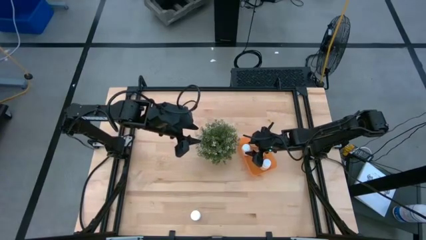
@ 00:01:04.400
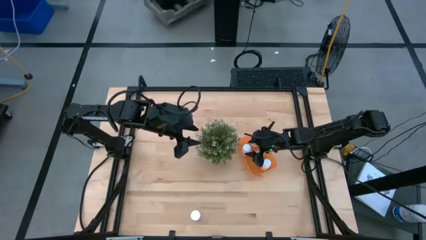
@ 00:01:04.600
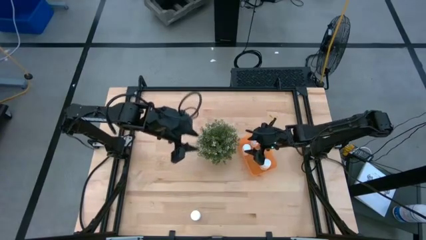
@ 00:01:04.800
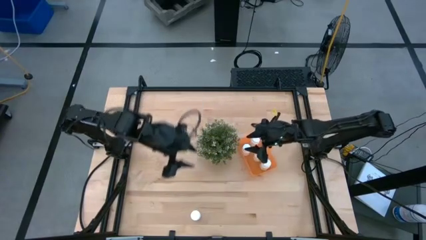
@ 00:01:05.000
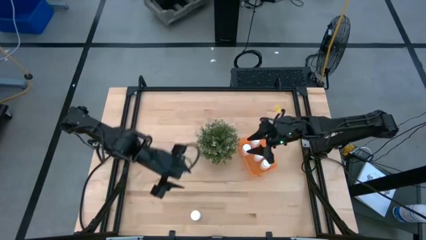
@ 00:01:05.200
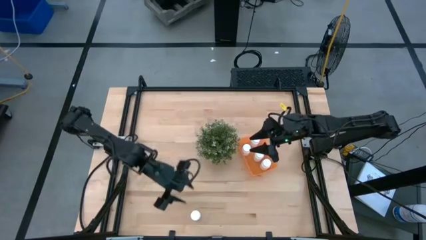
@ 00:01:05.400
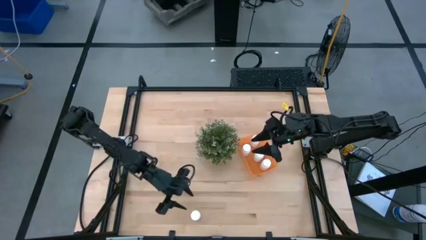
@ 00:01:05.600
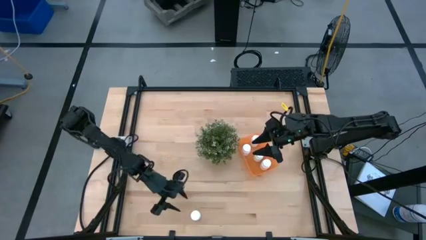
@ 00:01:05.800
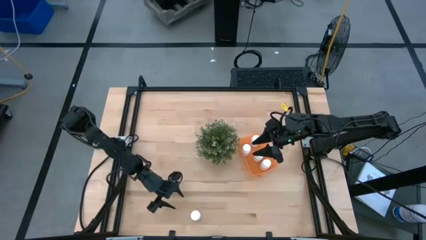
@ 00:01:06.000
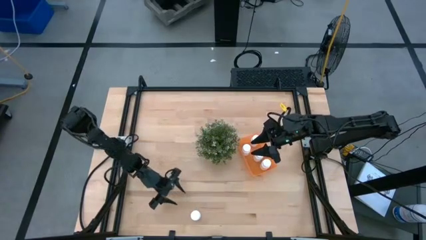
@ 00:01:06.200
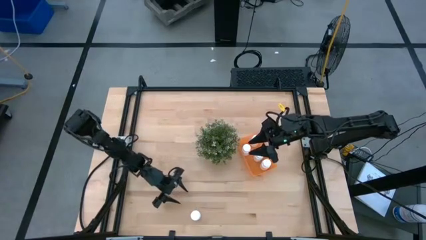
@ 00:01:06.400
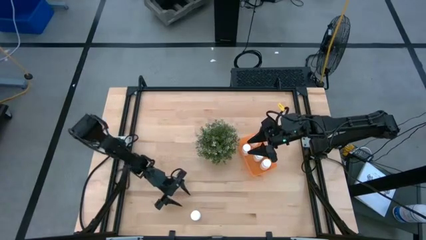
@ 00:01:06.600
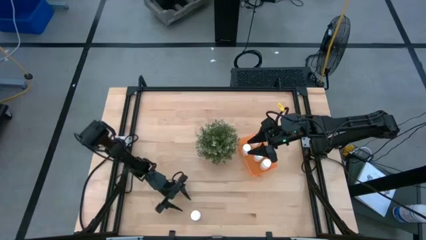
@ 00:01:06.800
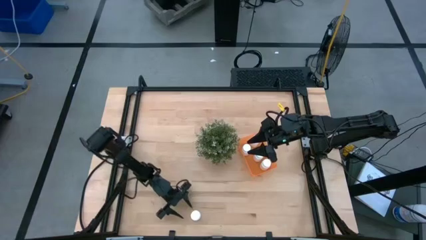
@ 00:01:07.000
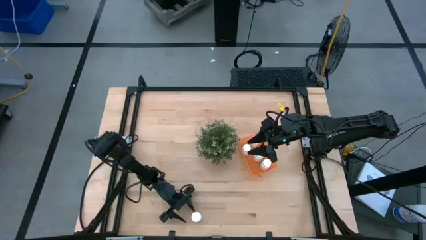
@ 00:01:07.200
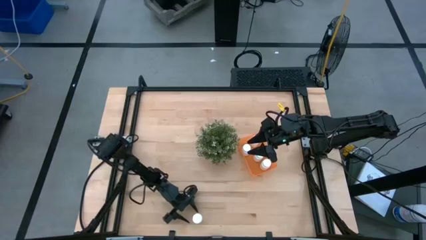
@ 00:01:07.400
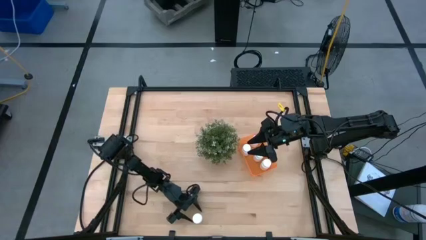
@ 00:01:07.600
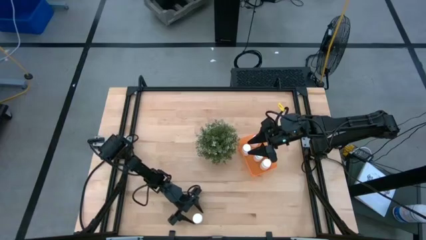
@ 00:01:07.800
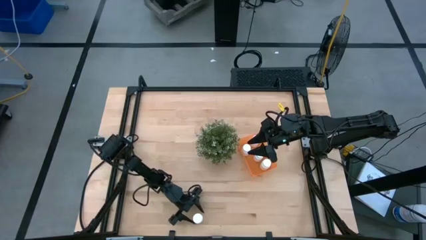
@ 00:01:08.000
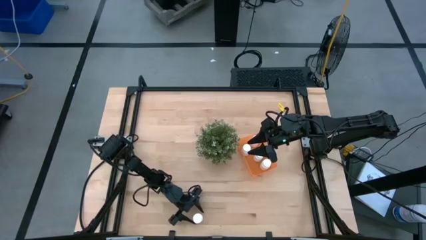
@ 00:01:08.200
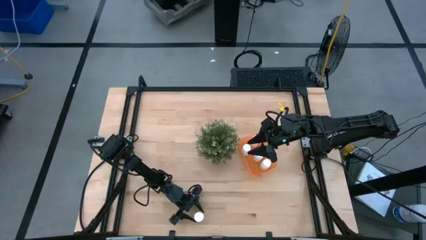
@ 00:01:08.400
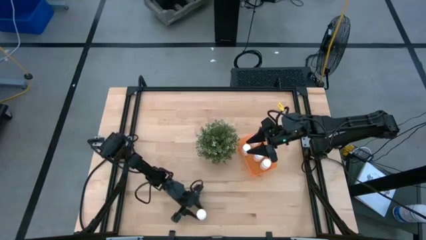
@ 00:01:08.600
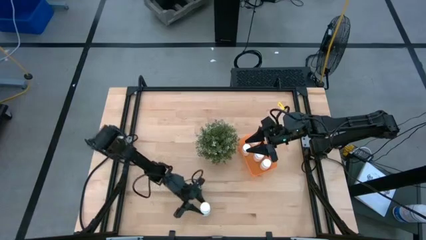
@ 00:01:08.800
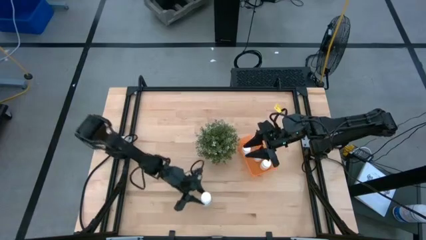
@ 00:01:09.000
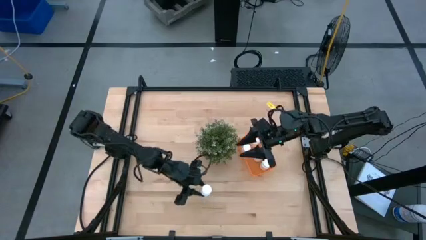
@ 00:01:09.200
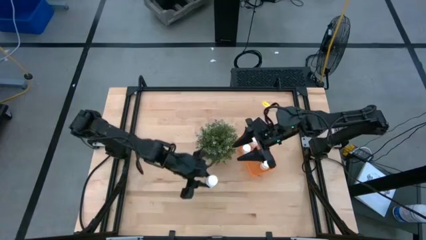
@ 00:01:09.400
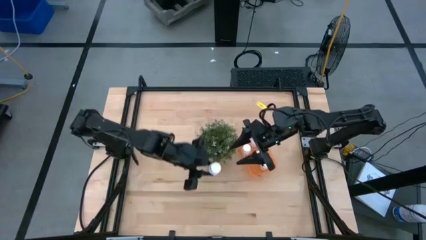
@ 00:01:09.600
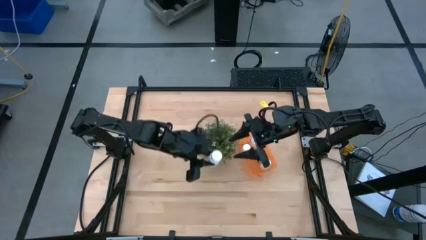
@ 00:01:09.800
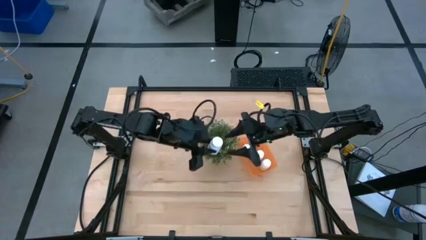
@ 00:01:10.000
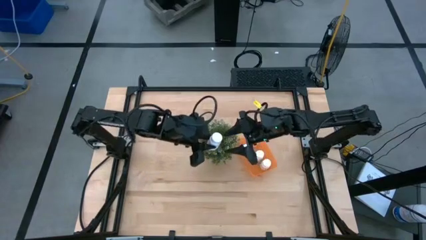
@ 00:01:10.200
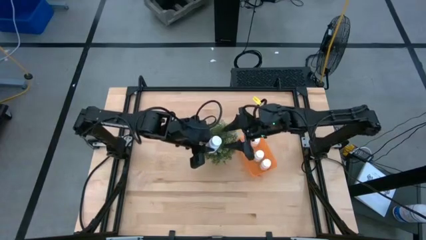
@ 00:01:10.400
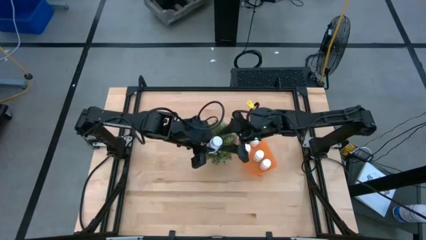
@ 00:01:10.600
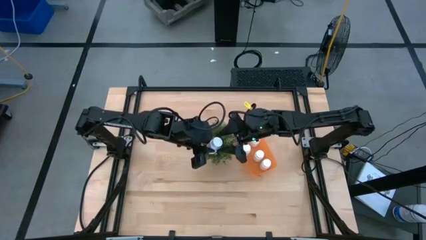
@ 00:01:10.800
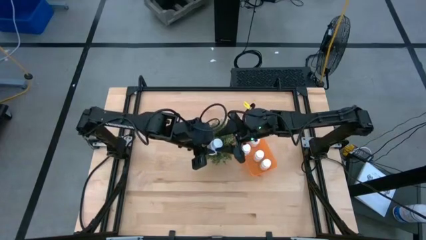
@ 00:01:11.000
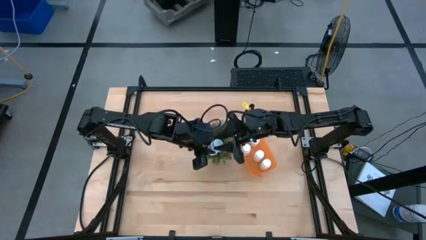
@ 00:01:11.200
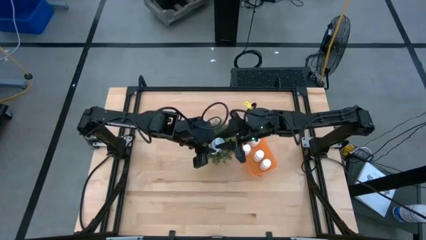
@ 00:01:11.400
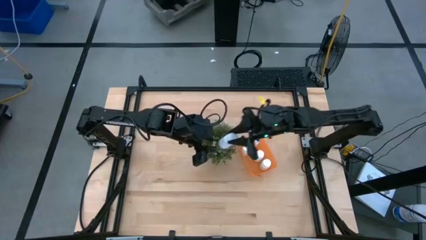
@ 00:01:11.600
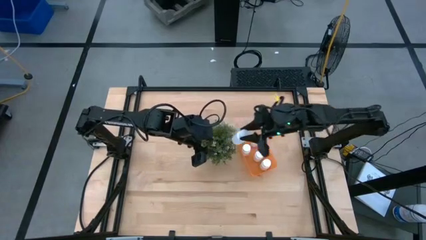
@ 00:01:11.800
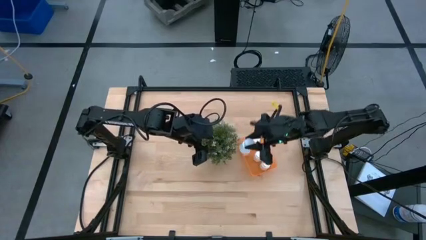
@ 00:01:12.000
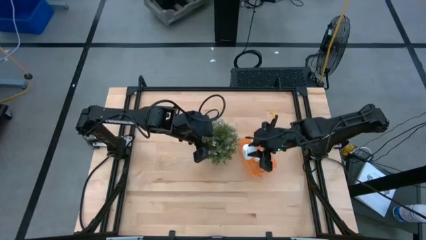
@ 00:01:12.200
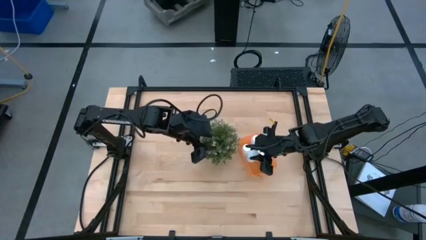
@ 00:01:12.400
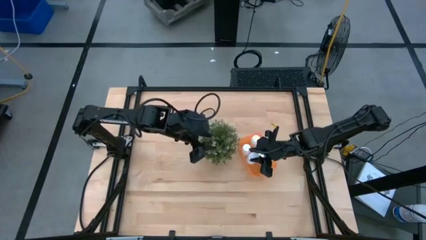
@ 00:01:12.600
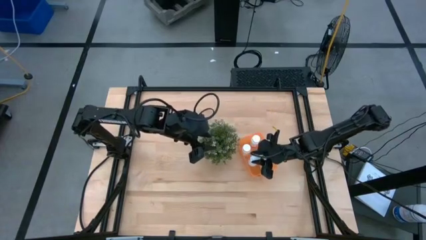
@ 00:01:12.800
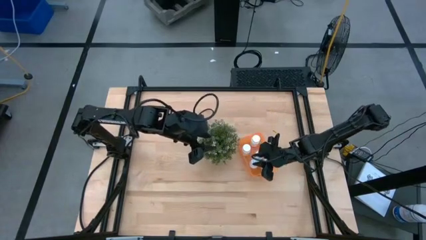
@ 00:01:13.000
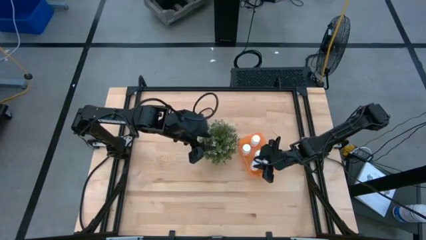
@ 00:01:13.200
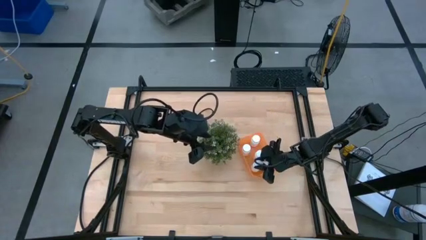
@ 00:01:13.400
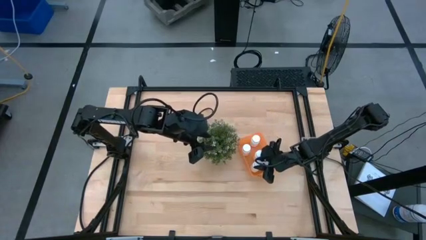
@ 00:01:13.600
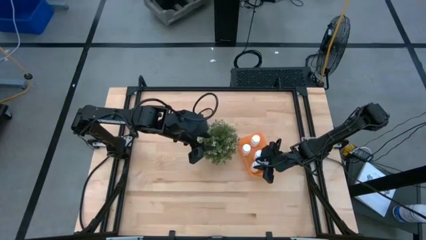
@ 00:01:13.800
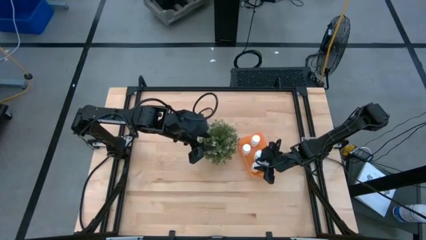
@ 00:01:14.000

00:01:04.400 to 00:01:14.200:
Task: Pick and place pill bottles into a basket
Put the white medicine bottle into the orange bin

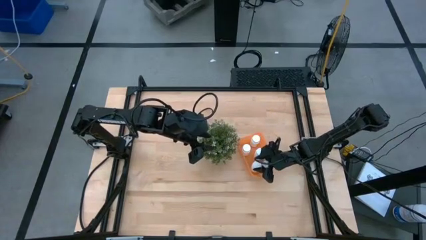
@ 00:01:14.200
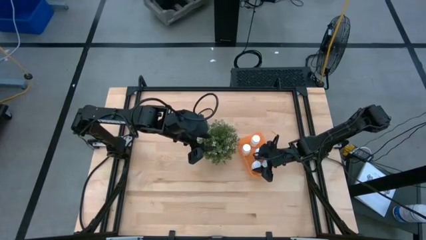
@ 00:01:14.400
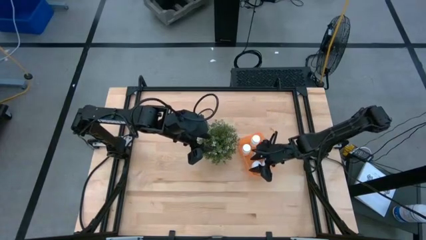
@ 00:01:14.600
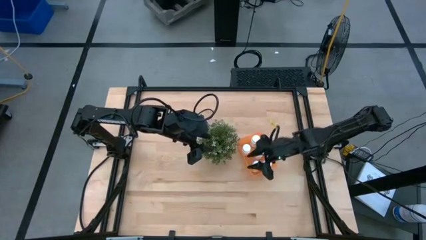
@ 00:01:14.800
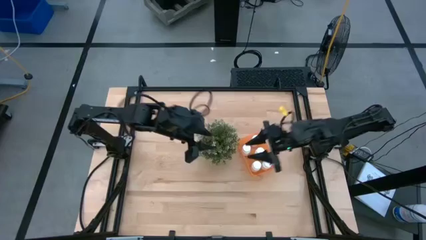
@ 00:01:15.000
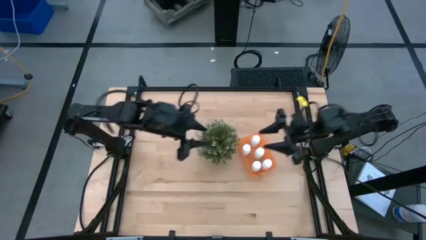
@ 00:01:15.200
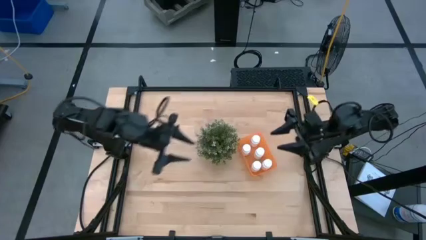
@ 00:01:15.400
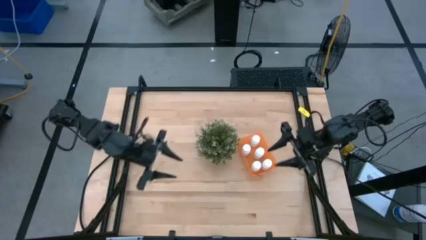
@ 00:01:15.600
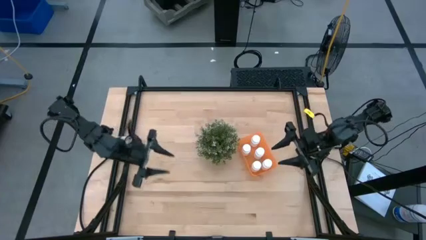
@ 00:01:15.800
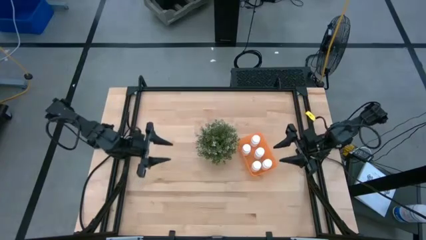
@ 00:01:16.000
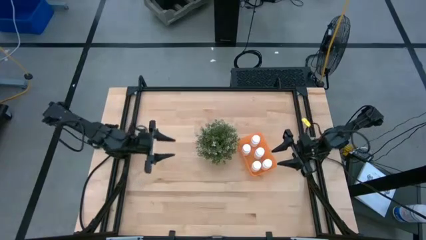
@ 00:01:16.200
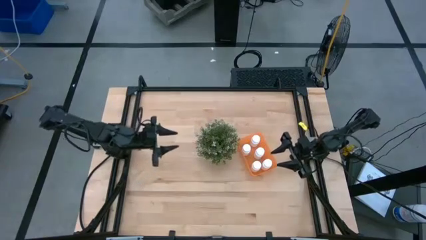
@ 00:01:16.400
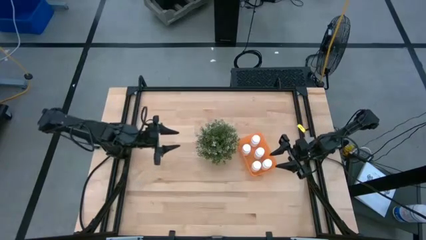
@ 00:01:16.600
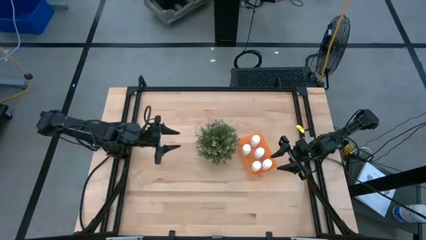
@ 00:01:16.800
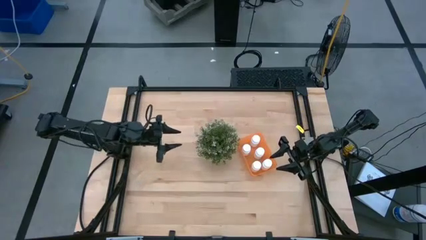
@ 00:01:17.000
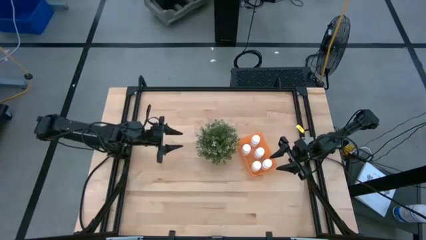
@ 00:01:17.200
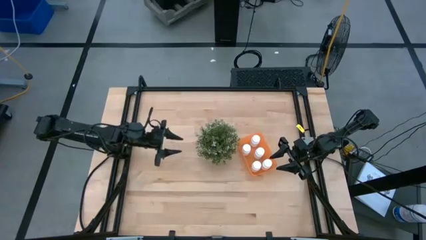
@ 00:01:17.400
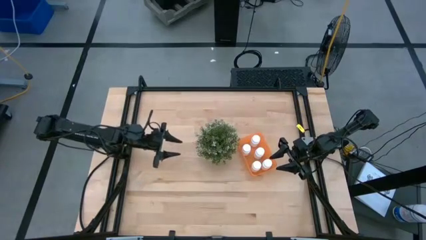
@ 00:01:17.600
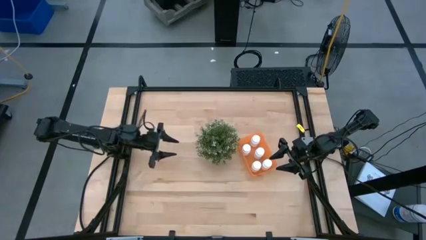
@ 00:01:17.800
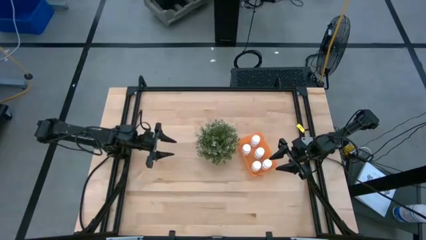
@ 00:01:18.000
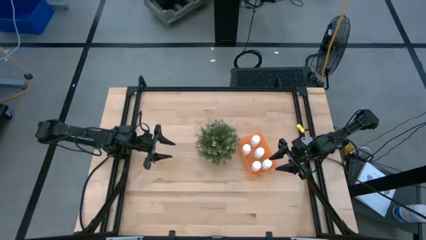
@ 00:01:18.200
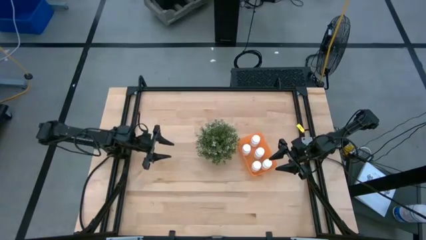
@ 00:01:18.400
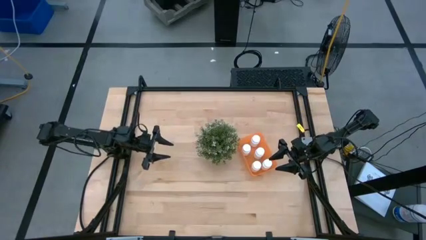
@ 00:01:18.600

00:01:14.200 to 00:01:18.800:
Return to Home Position

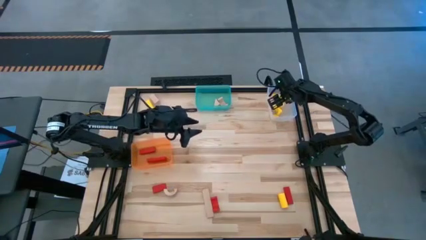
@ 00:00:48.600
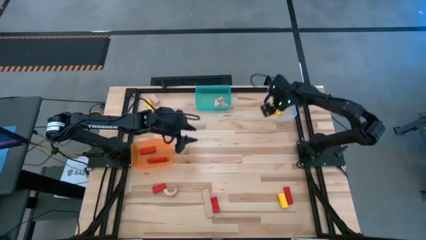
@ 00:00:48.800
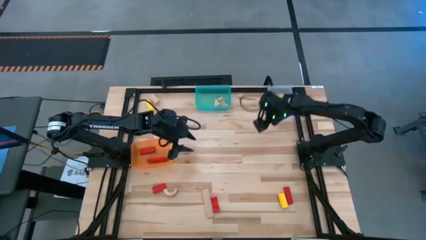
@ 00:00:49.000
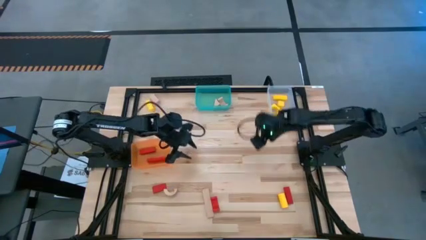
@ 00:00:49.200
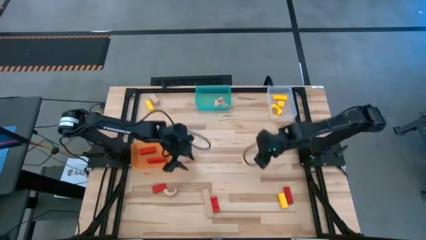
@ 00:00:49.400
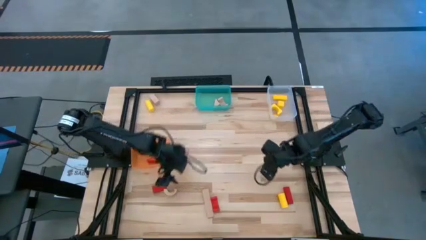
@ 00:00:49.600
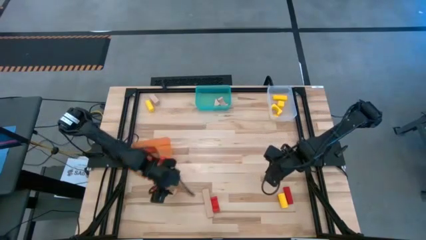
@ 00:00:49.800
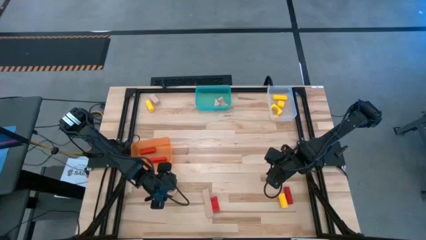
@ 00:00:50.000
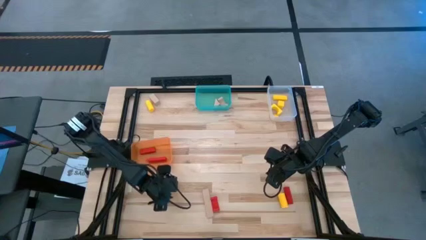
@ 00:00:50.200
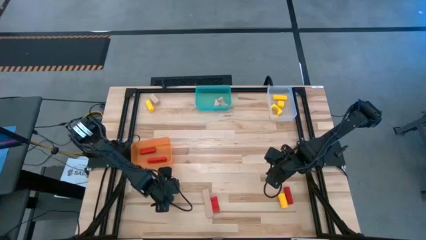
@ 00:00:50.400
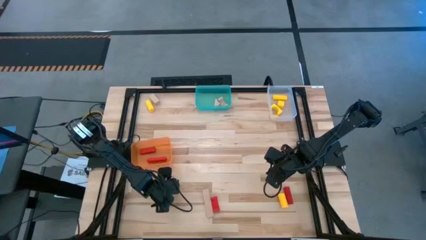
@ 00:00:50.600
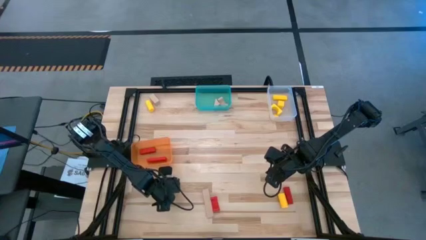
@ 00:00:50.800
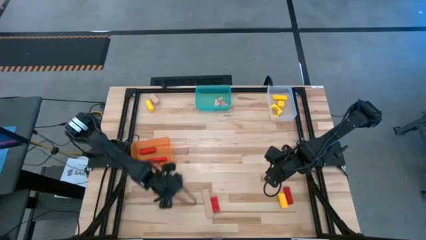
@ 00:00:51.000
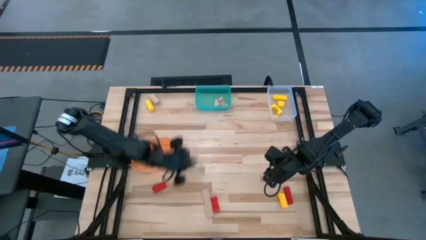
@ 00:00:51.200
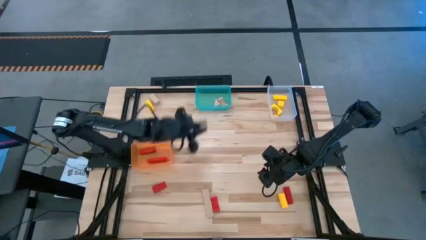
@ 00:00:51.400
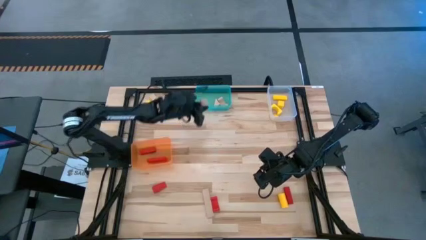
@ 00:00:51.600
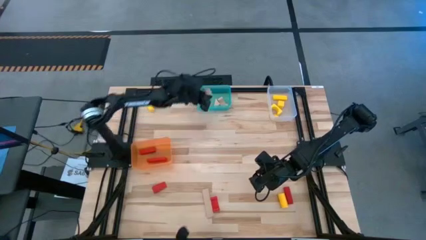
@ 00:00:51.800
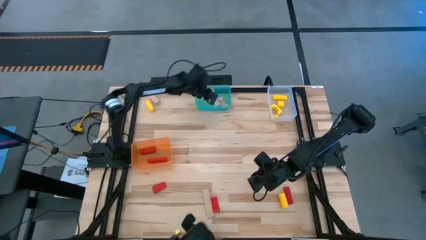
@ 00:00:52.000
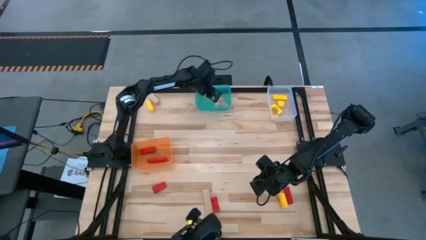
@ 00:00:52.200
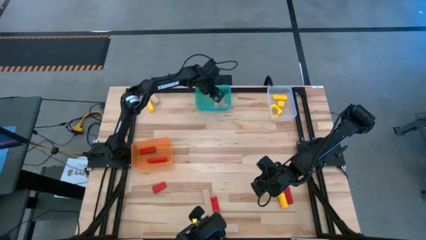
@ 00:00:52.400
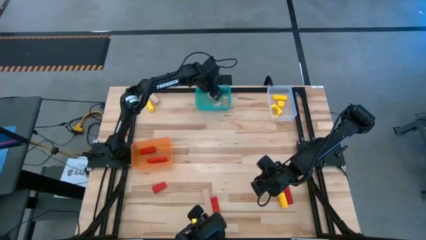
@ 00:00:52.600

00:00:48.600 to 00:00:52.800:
Task: Sort & place blocks by color
Put the brown block into the transparent blue bin
